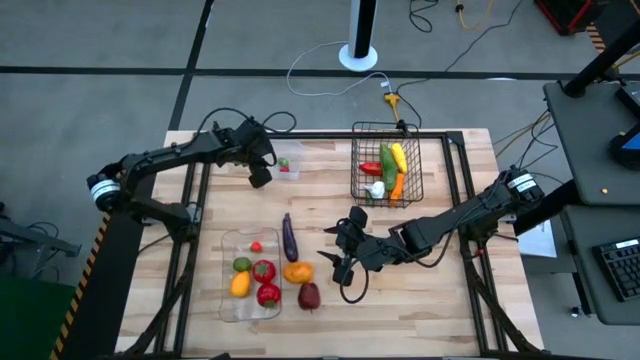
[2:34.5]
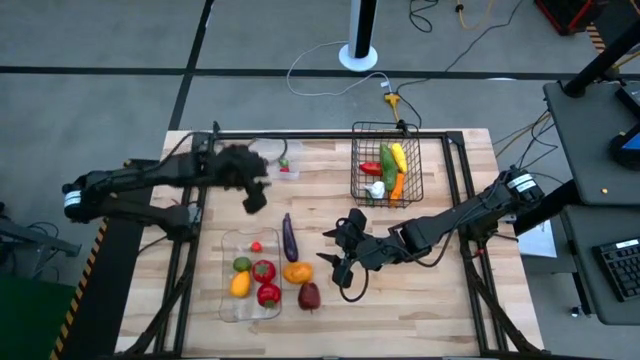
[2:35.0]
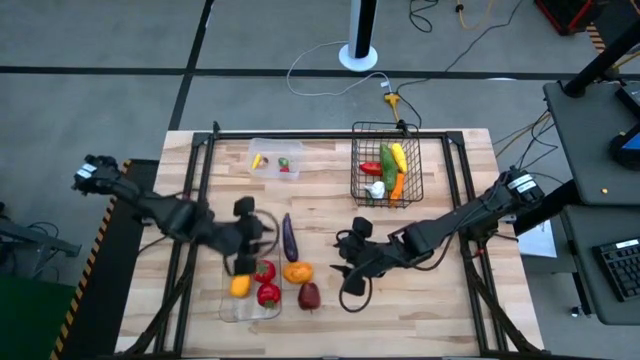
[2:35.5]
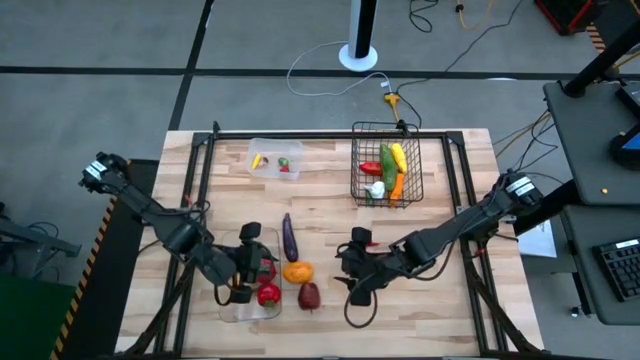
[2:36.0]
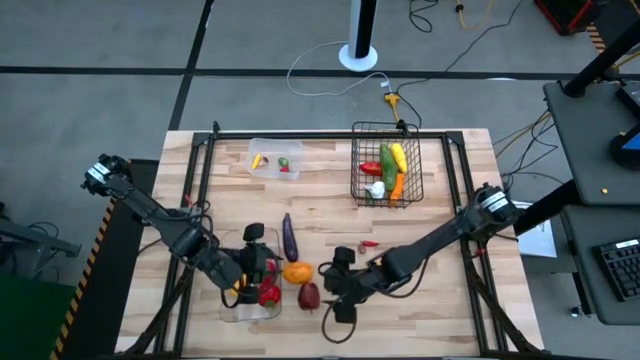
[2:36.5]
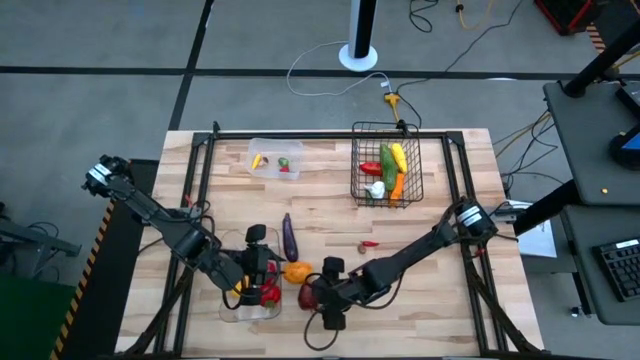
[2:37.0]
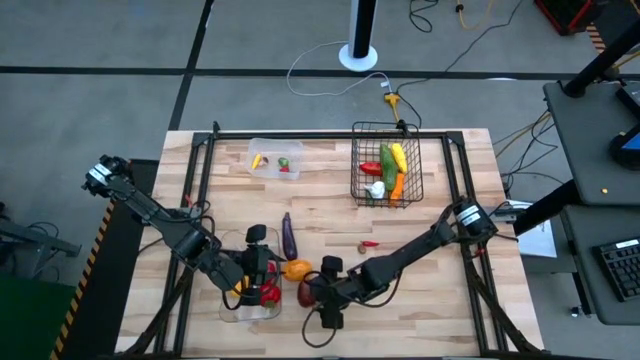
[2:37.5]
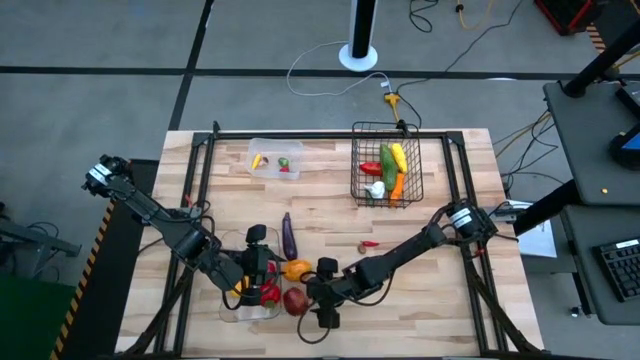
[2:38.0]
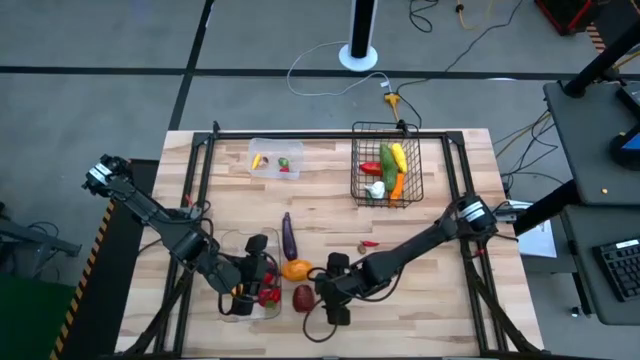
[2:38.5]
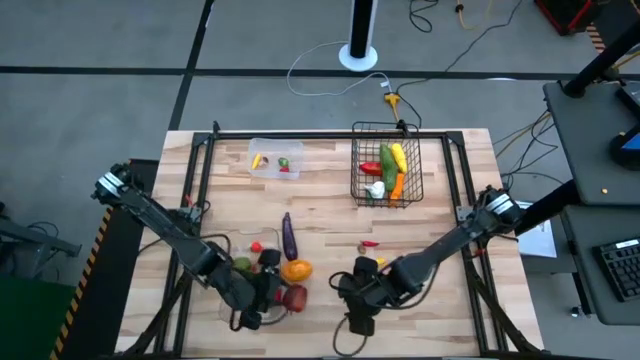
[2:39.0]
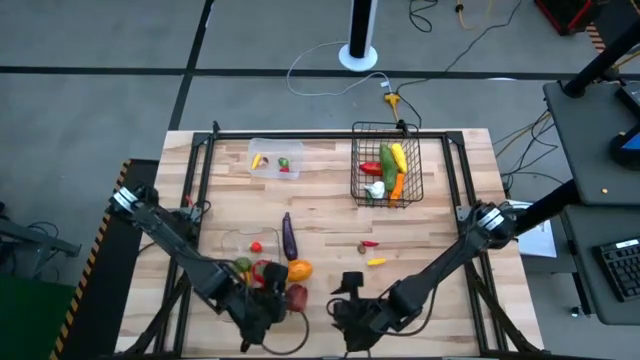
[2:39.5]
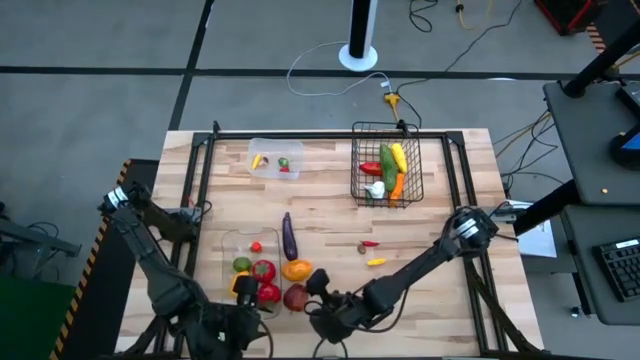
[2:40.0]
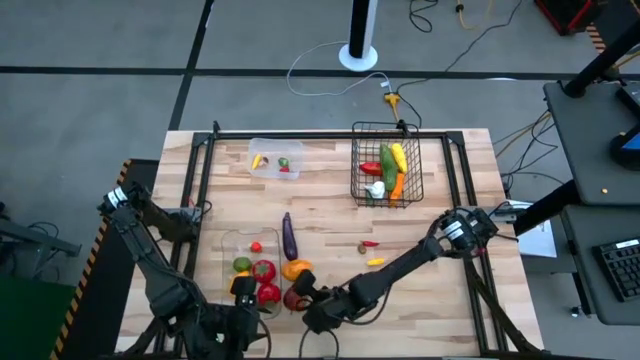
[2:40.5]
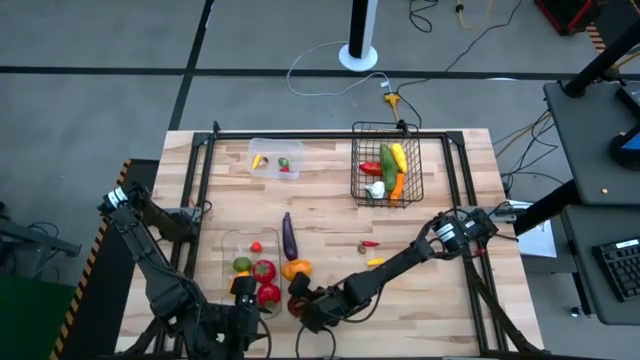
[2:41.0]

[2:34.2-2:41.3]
Task: Sort produce into baskets
Put the red apple into the transparent bin

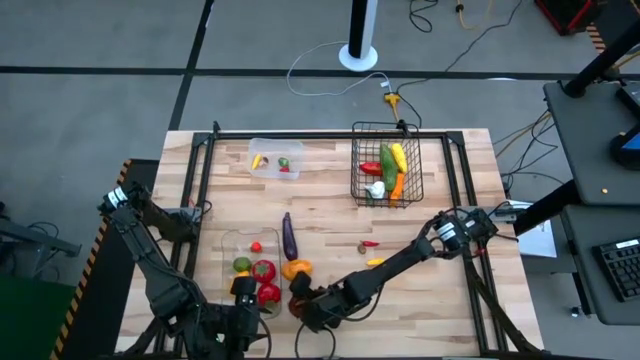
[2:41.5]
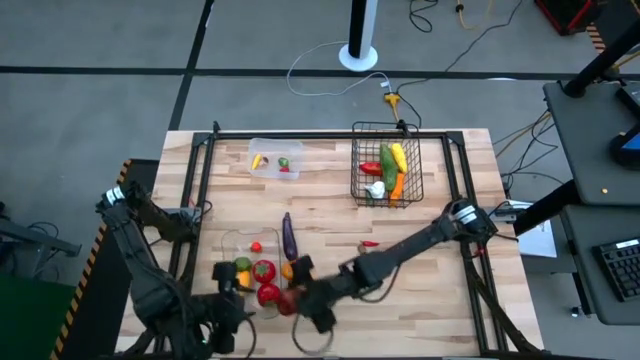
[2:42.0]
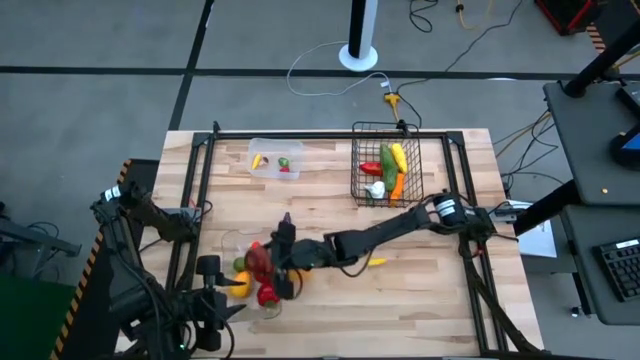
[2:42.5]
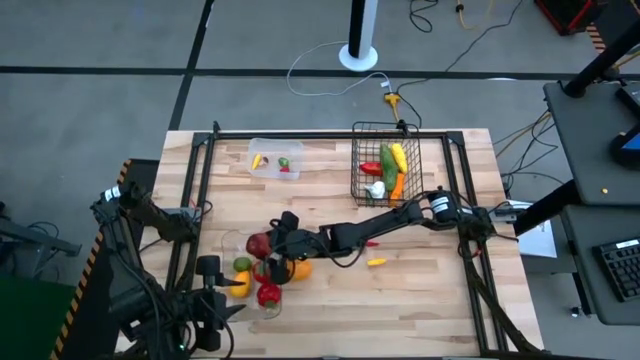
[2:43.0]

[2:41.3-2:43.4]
Put the red apple into the transparent bin

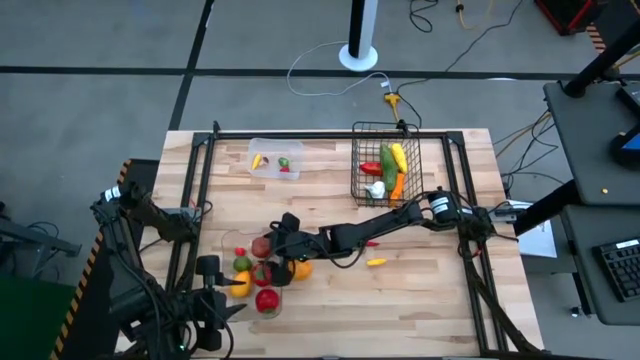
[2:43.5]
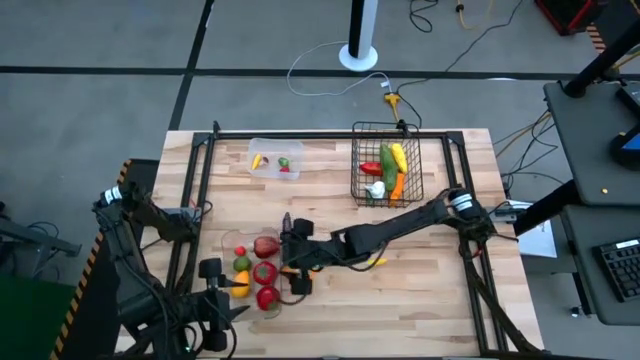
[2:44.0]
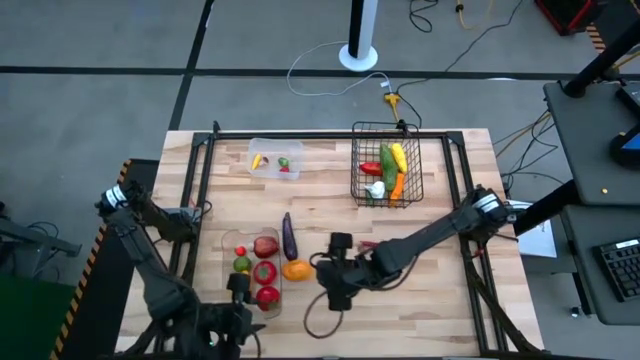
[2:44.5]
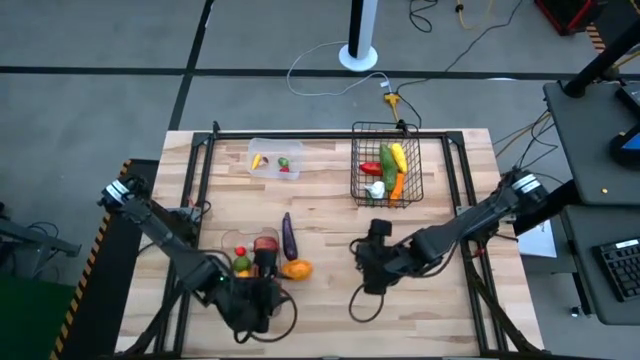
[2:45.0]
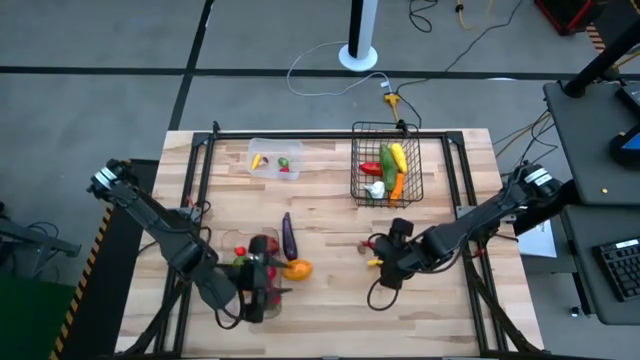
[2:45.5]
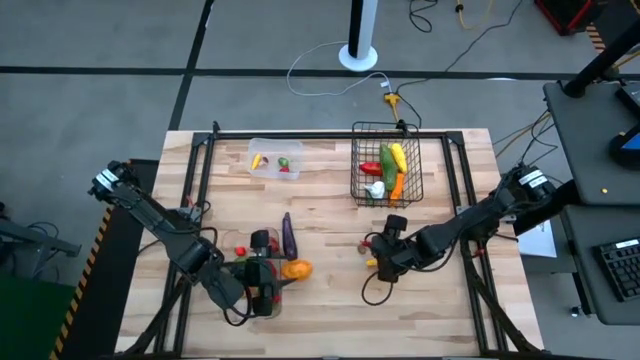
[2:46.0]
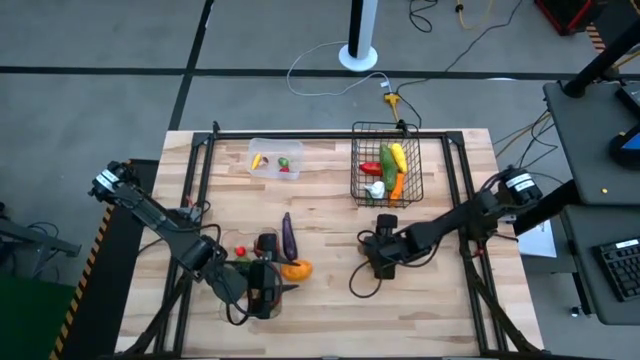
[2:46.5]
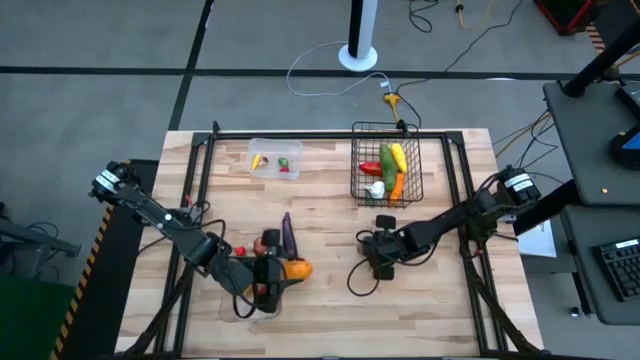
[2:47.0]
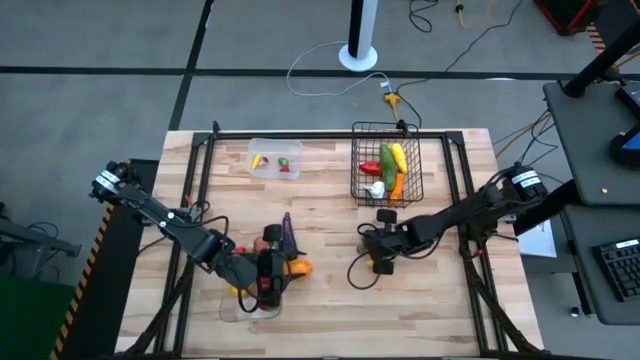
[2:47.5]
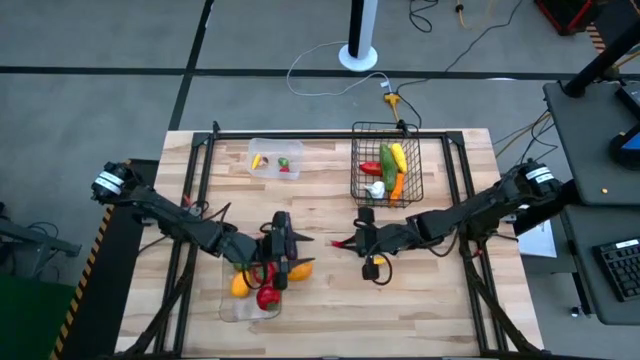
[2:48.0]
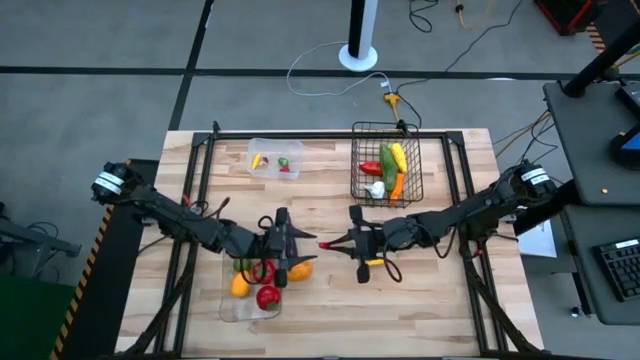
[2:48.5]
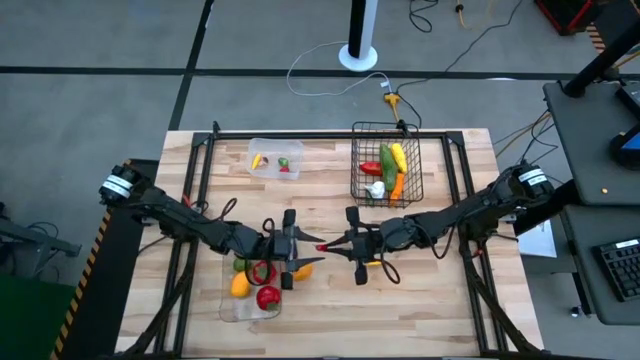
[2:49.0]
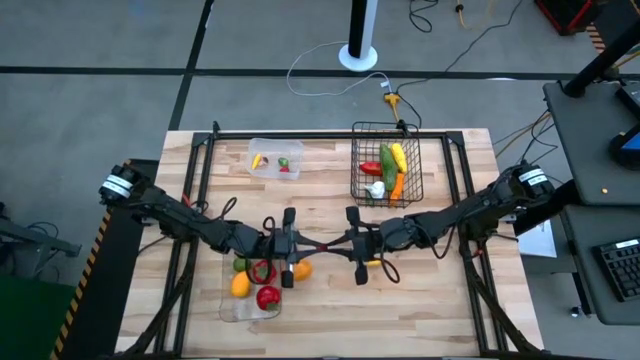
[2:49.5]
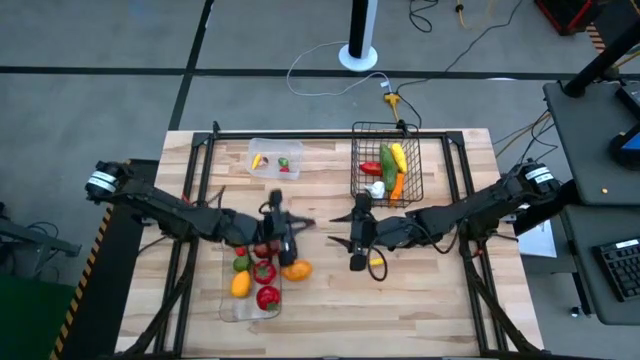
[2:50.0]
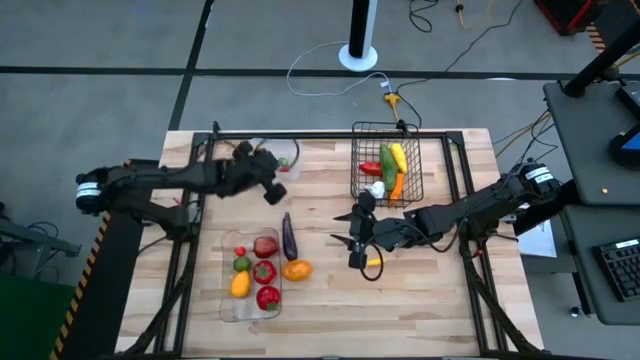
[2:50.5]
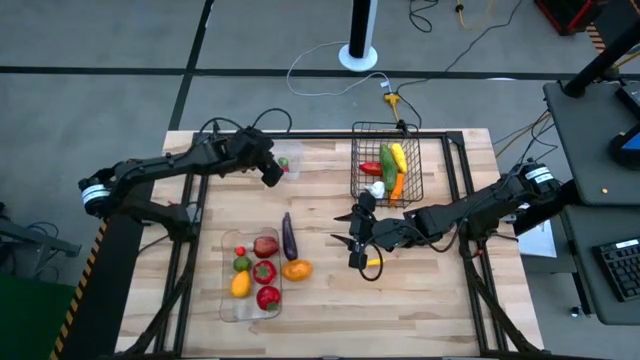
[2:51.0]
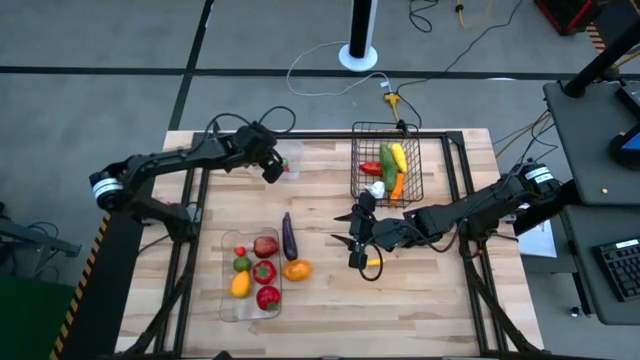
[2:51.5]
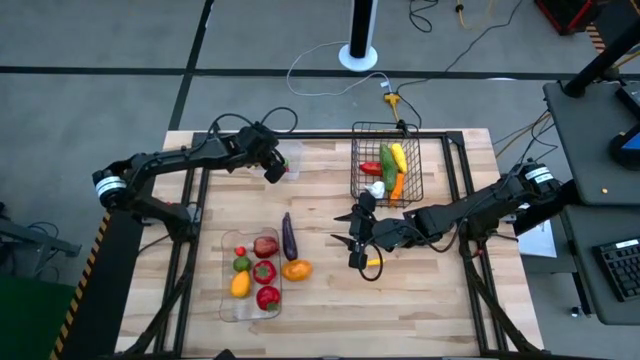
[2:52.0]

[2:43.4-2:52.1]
Put the red chili into the white bin

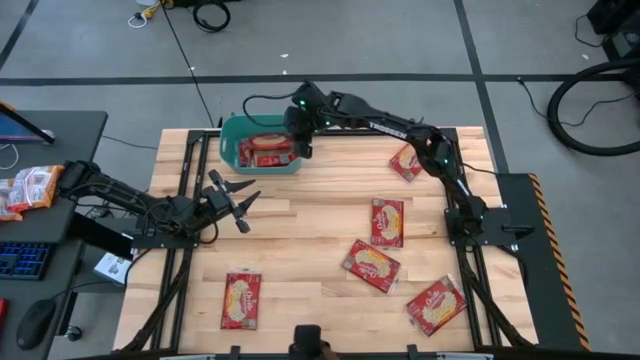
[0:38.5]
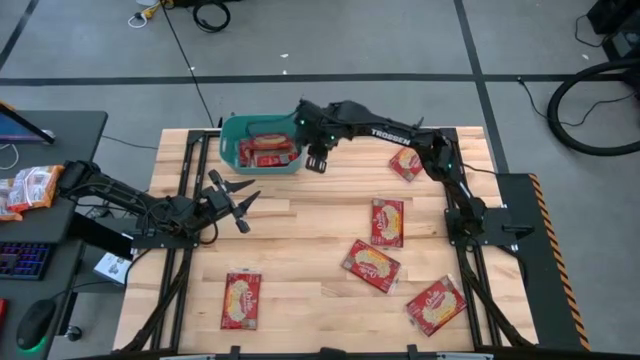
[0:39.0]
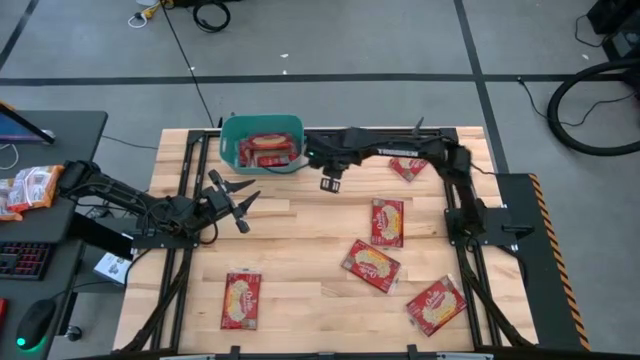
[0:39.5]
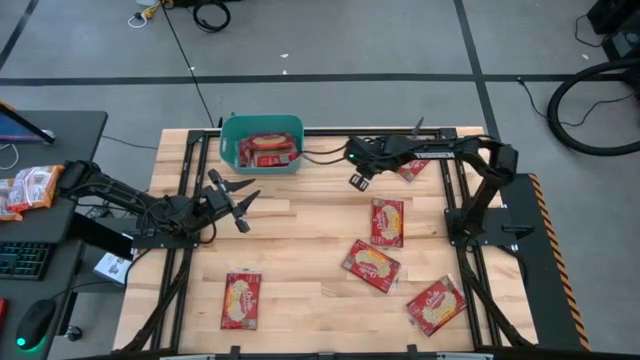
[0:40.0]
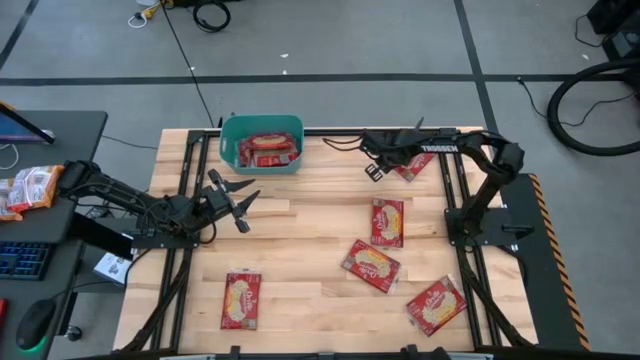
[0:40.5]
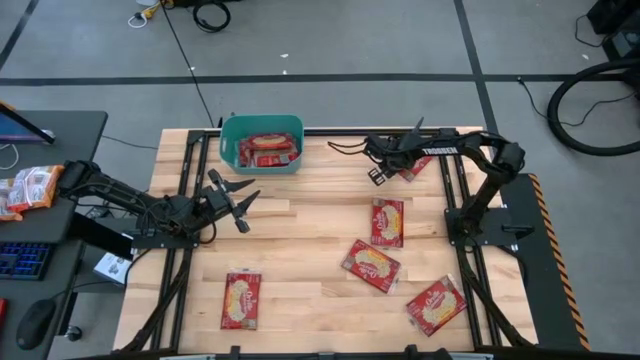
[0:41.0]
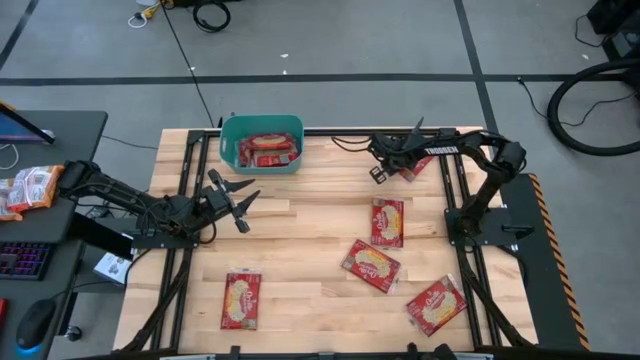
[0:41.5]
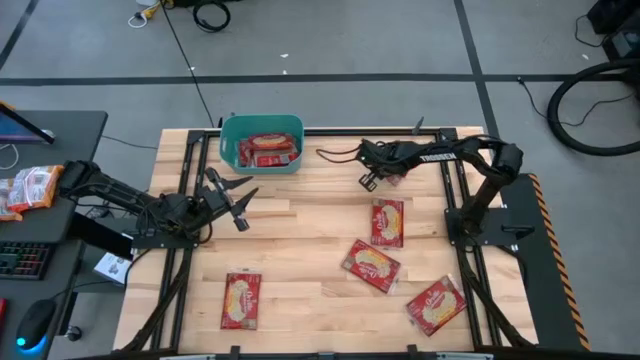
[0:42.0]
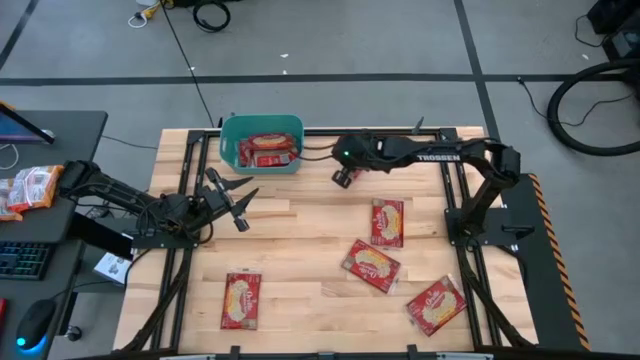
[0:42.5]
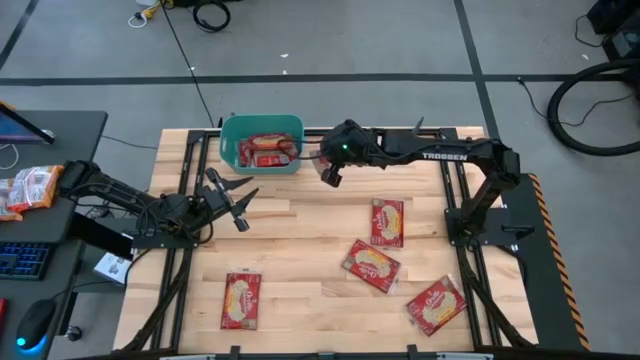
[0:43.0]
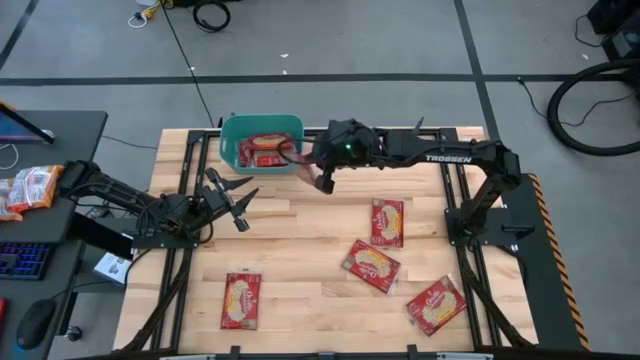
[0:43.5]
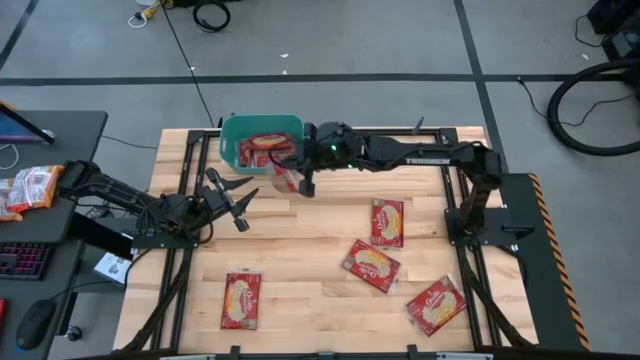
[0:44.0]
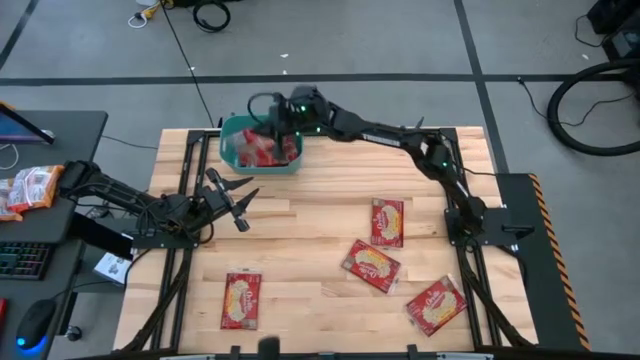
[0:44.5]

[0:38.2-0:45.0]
Task: Sort popcorn bags into baskets
Put the popcorn bag into the blue bin
